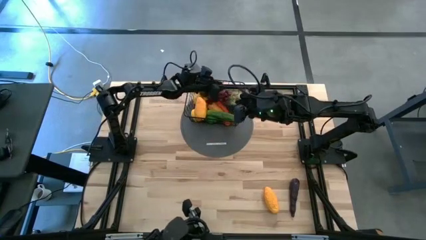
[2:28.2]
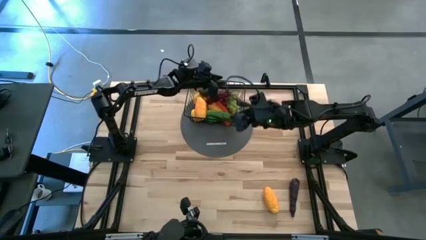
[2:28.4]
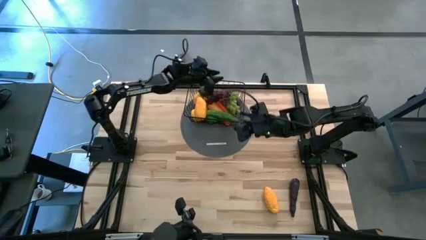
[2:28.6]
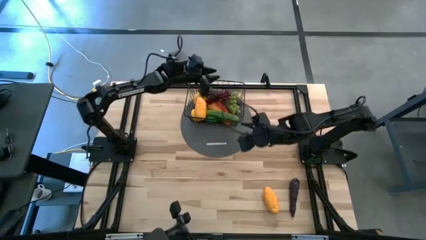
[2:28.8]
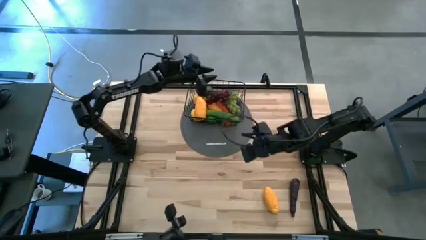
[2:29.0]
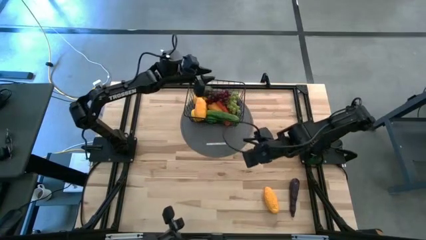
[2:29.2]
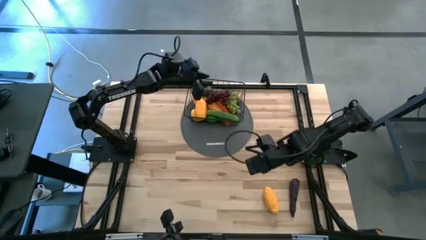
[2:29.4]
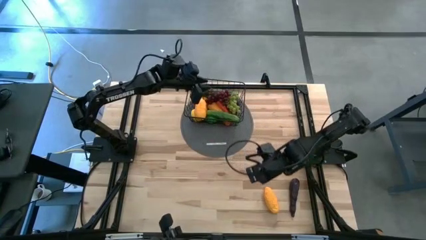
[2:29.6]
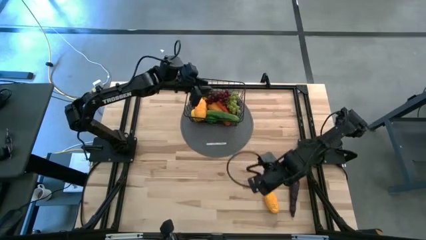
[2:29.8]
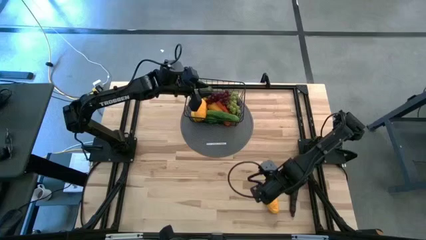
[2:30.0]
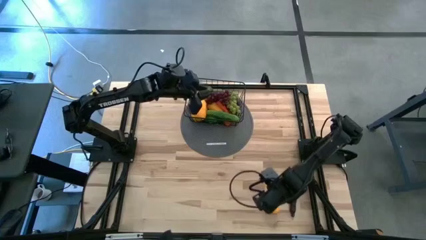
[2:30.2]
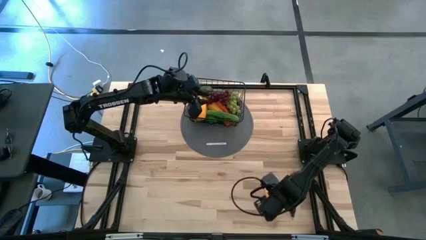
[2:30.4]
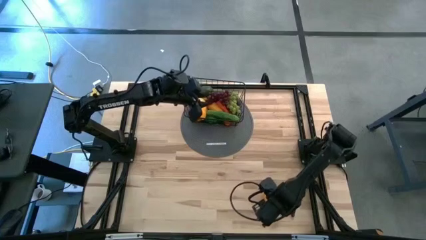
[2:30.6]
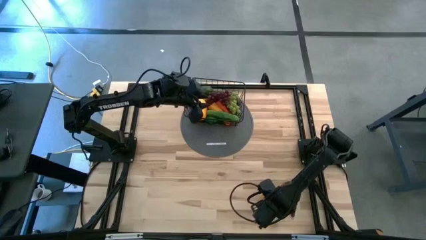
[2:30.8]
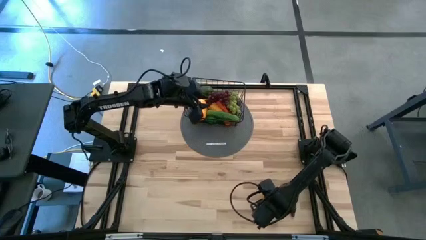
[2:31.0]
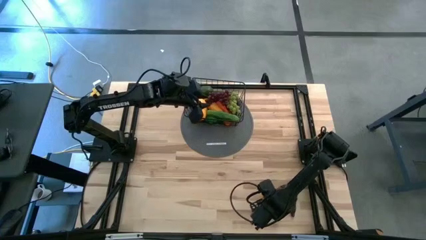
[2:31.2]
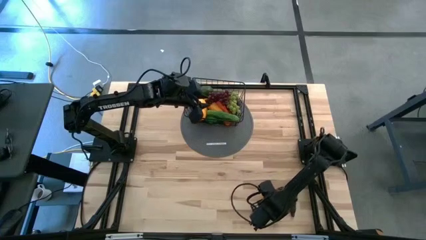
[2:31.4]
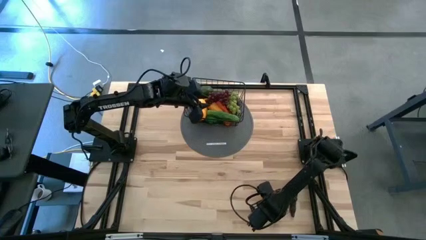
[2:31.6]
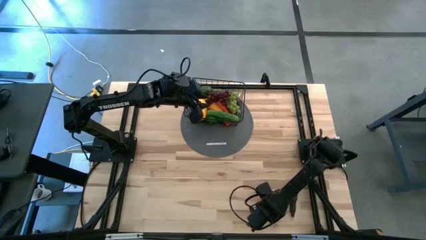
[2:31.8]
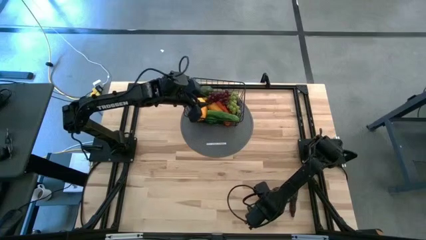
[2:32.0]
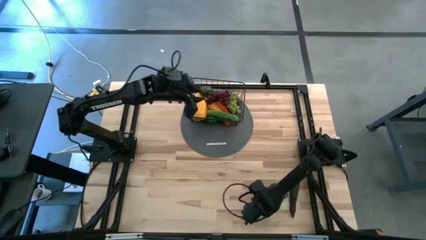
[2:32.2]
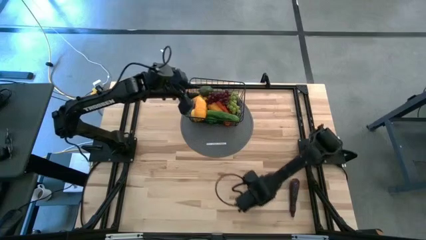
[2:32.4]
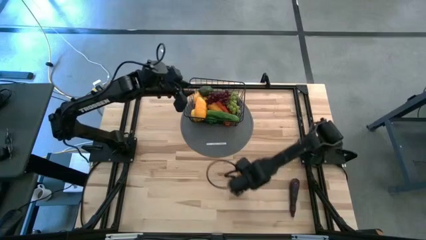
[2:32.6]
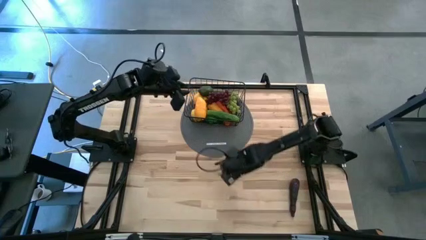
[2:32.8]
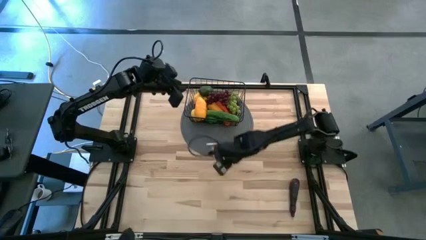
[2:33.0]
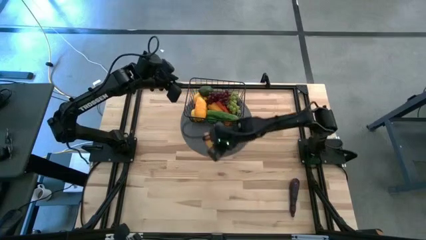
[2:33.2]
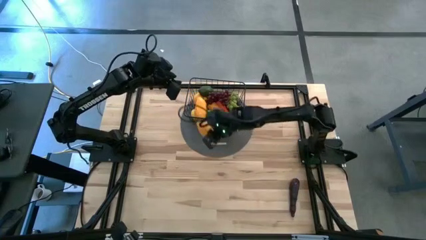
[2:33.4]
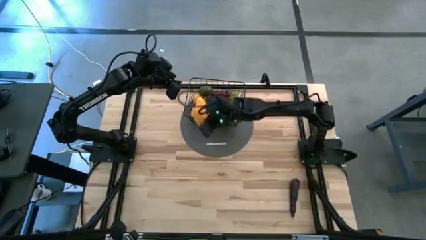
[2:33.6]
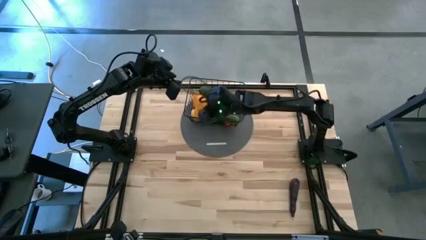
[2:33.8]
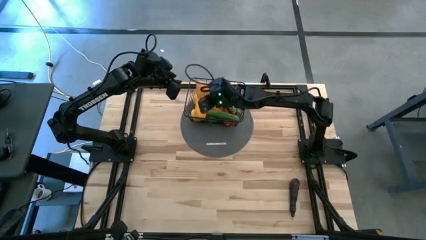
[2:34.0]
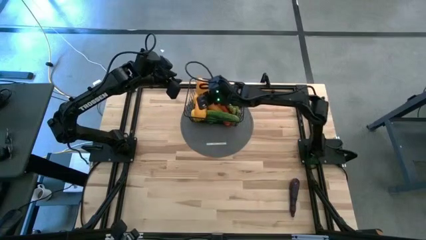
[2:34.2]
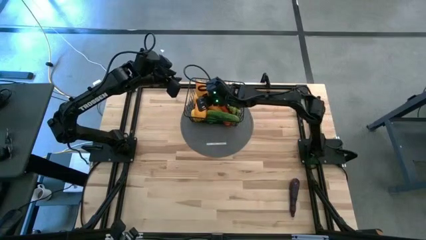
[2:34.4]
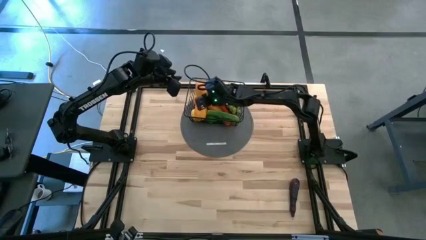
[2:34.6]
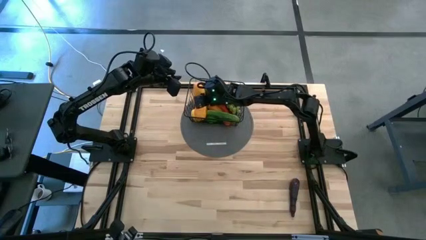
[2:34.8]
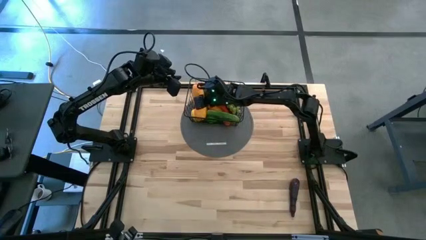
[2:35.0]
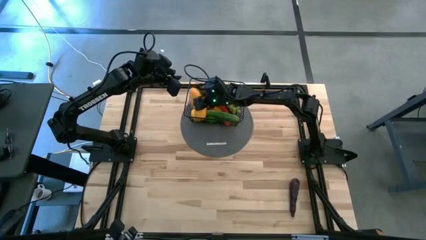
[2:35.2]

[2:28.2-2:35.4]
Task: Build produce basket
Put the yellow mango into the basket

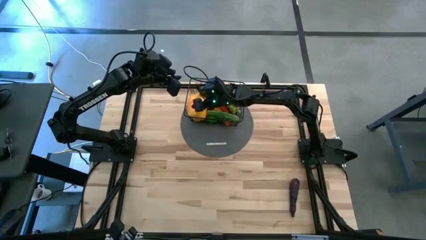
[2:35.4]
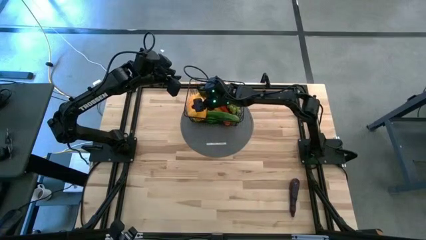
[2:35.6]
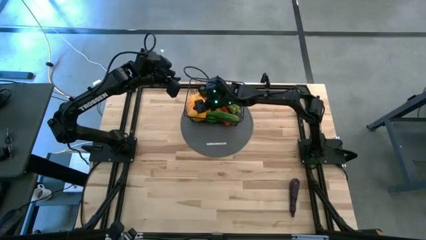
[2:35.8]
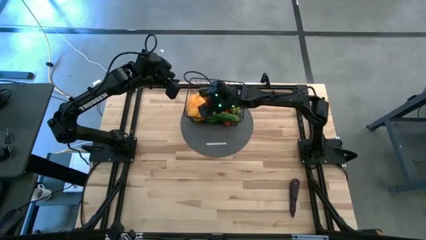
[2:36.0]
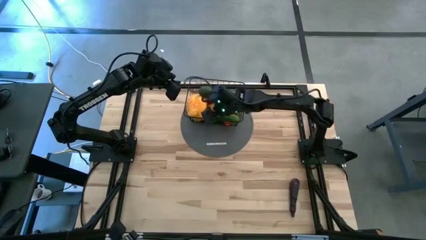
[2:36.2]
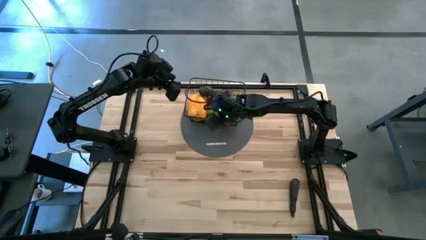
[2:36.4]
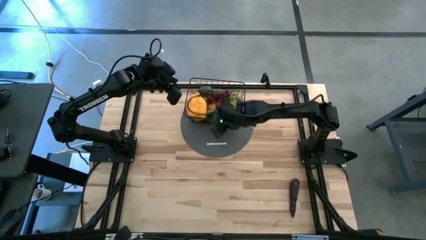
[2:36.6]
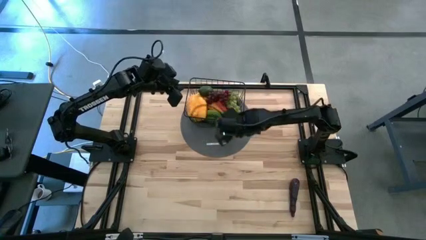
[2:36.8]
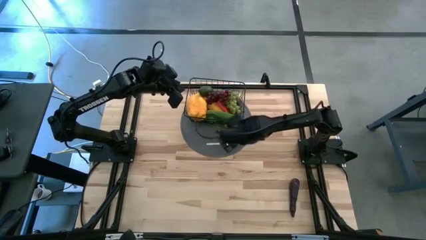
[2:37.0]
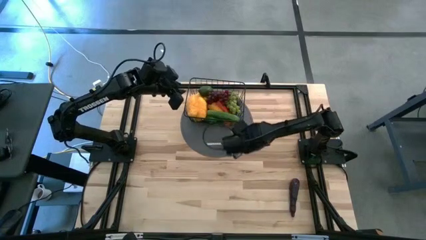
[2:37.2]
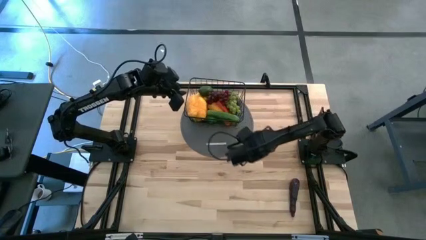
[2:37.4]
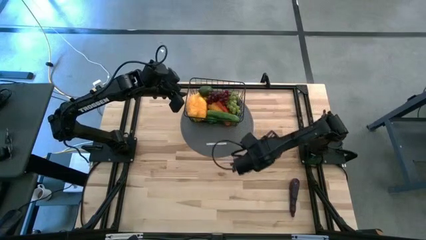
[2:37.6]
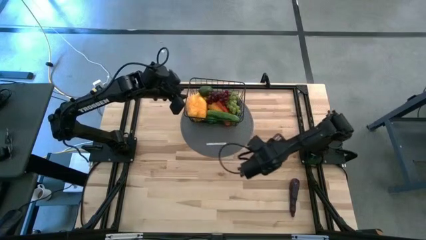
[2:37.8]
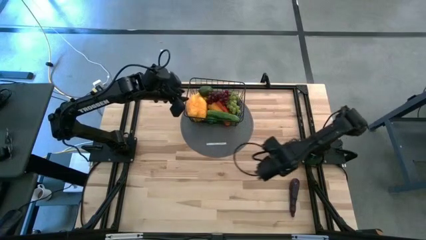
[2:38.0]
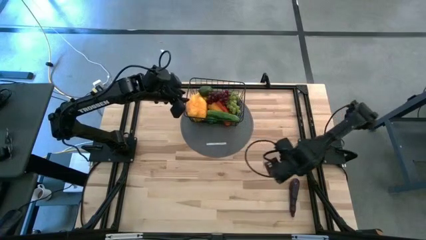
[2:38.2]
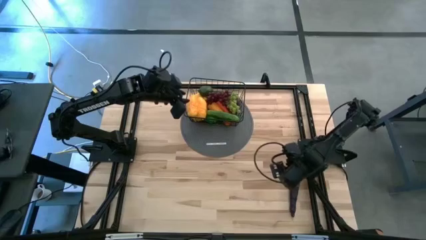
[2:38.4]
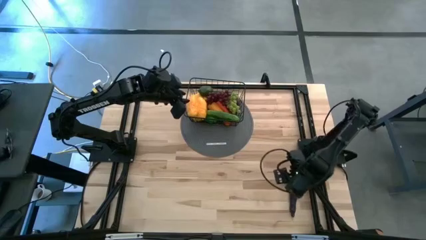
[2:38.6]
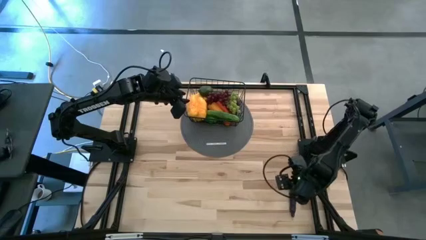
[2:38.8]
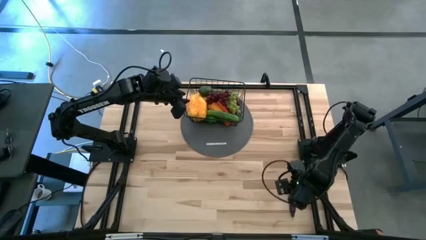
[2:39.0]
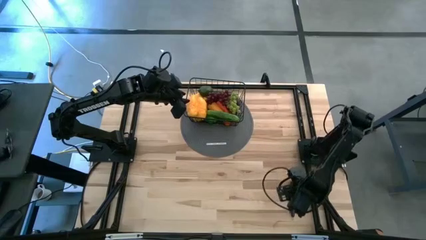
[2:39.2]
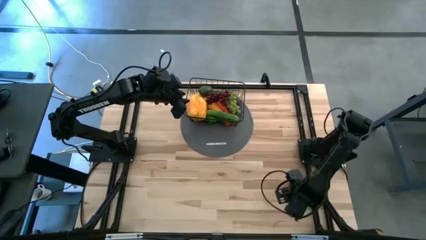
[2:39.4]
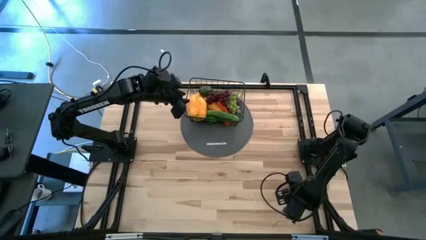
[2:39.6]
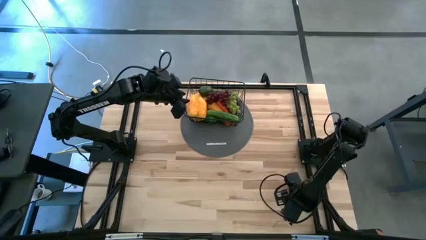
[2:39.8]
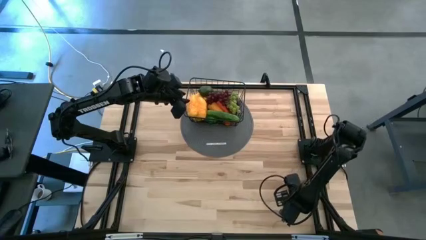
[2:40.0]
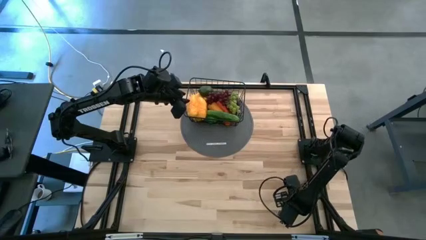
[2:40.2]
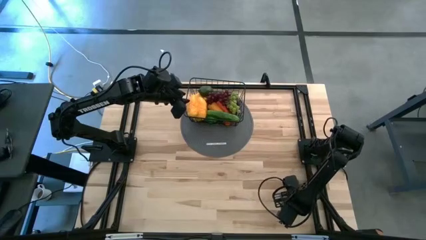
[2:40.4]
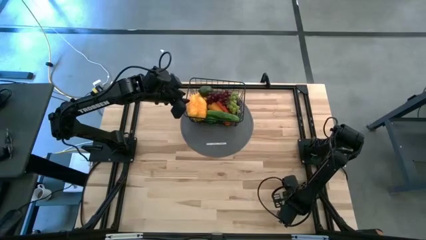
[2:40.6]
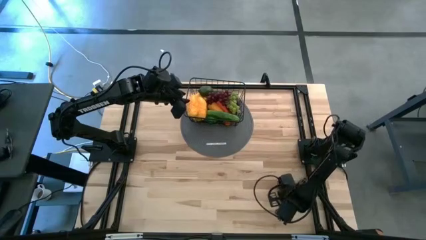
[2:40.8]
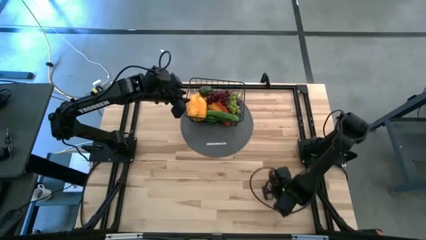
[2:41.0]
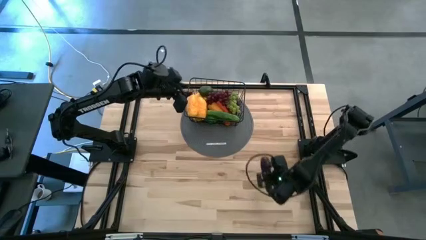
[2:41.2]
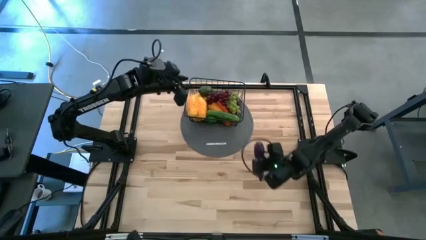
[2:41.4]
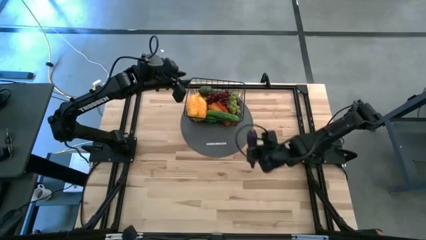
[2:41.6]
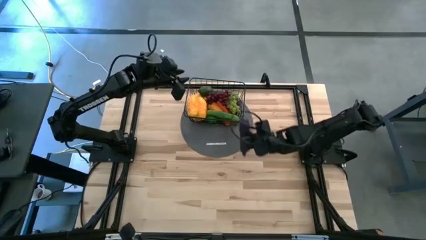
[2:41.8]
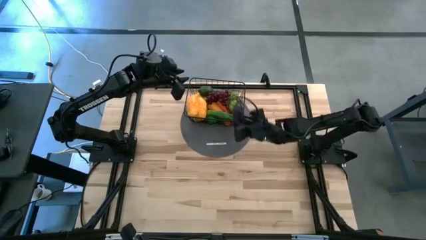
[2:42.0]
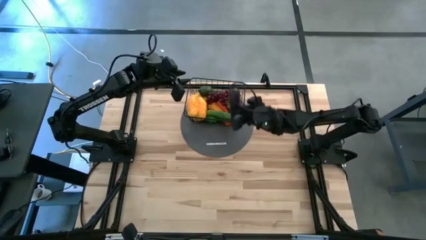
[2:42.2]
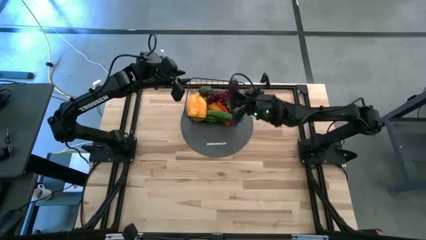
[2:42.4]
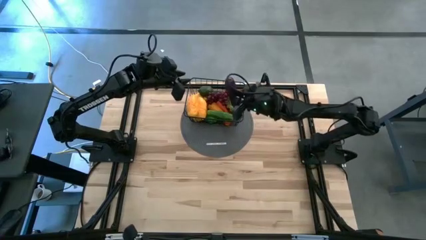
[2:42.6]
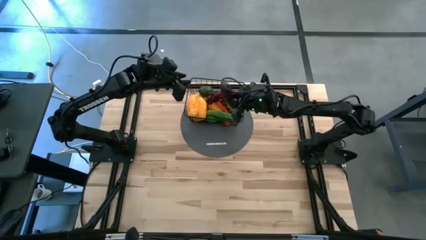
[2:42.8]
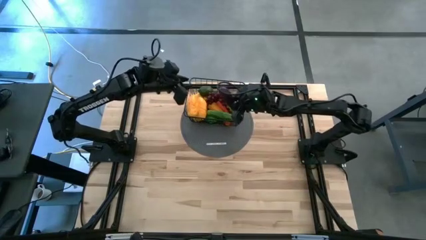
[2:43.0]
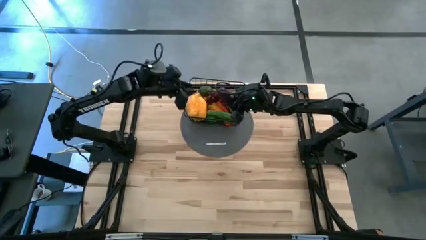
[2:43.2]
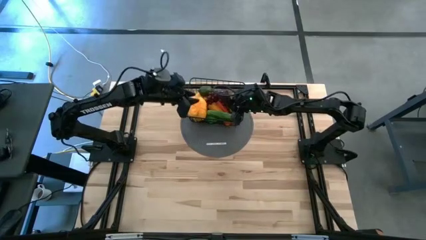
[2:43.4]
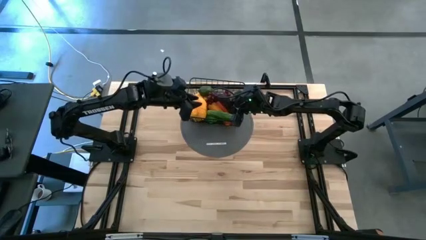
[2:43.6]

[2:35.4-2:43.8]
Put the purple eggplant into the basket

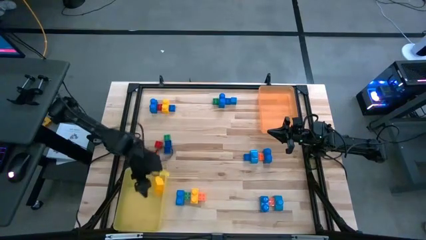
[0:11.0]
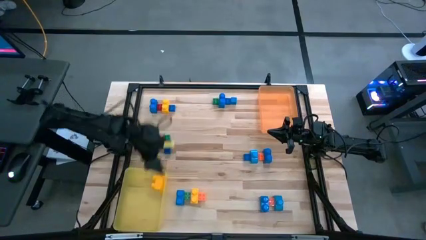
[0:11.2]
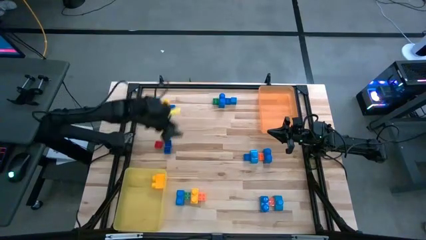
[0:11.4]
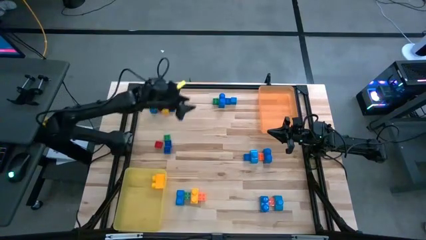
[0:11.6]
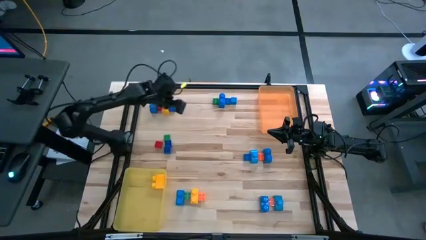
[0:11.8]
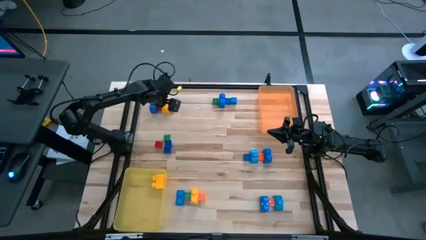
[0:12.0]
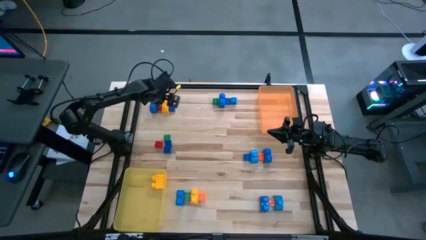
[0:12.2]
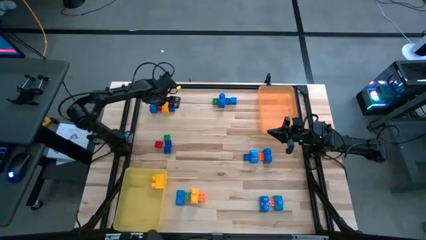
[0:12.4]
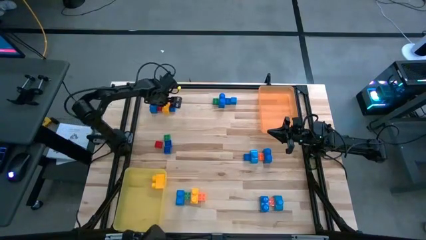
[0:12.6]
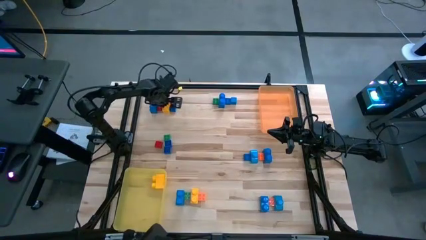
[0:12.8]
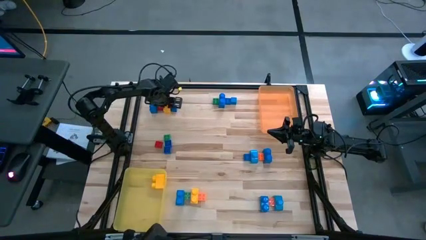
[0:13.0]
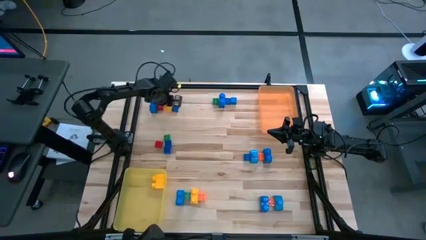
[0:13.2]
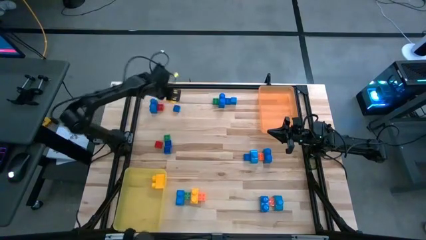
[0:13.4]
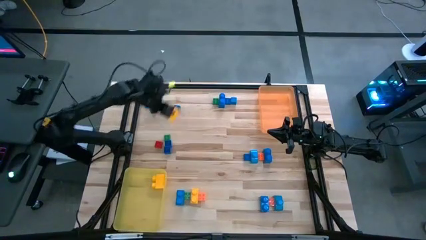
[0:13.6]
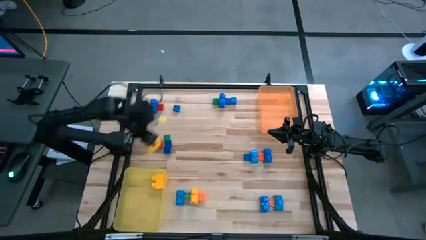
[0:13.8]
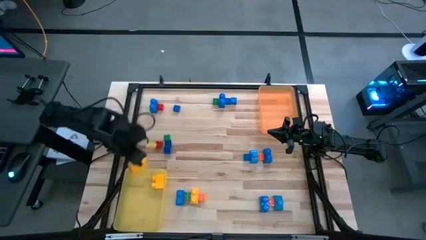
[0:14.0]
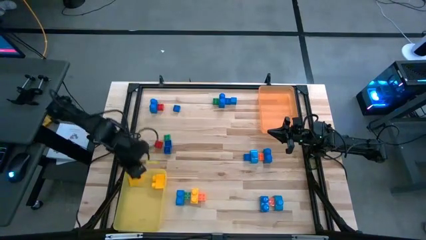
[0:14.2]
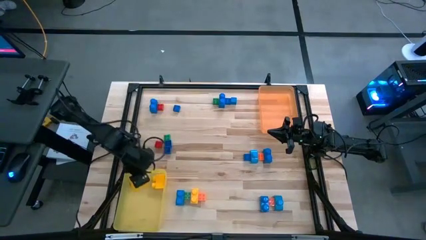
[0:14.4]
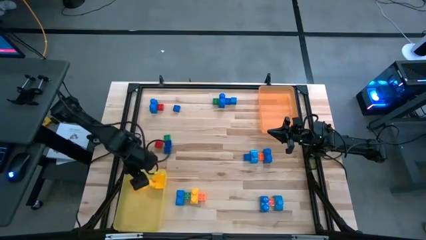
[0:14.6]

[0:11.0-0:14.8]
Task: Sort blocks by size
Put the large yellow game piece into the yellow bin
